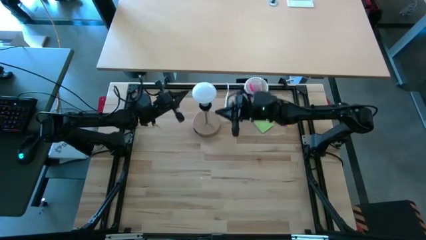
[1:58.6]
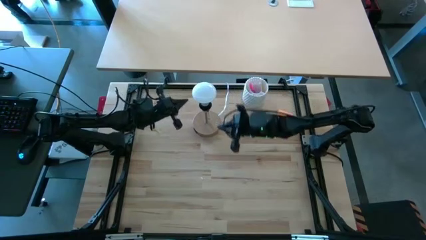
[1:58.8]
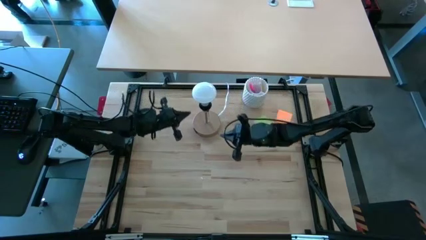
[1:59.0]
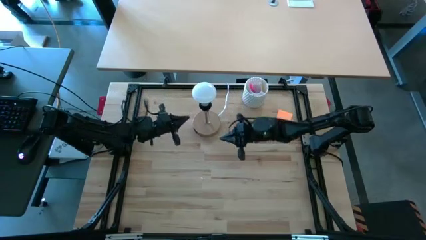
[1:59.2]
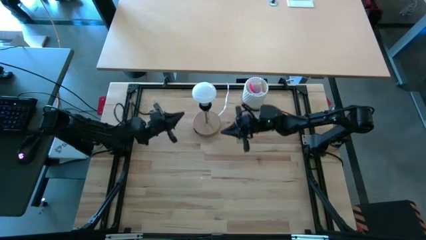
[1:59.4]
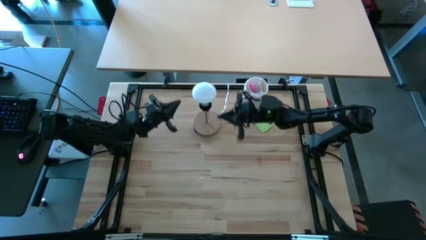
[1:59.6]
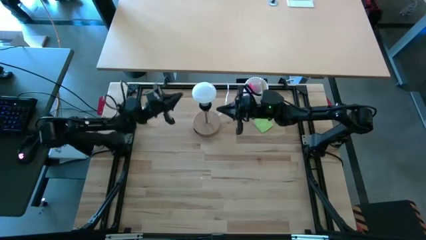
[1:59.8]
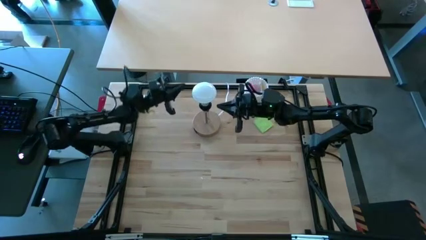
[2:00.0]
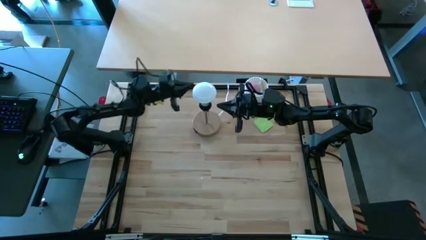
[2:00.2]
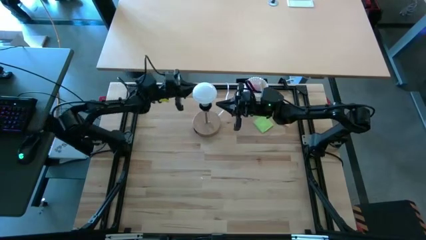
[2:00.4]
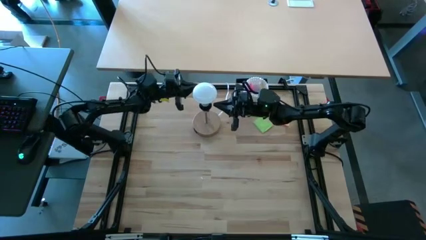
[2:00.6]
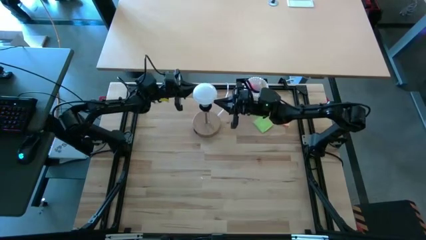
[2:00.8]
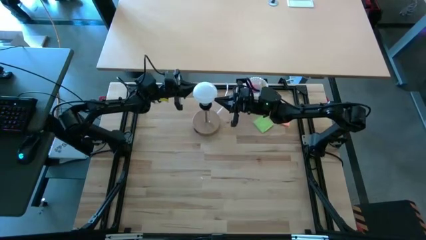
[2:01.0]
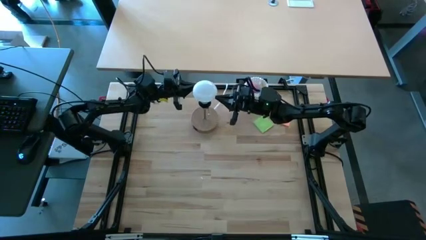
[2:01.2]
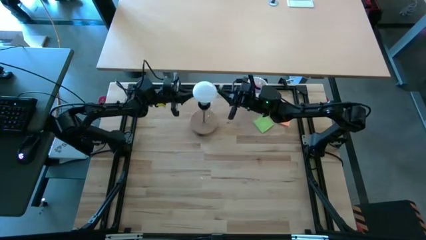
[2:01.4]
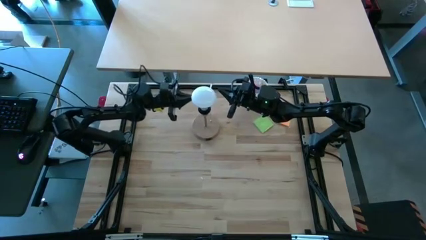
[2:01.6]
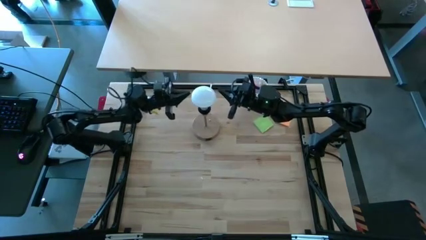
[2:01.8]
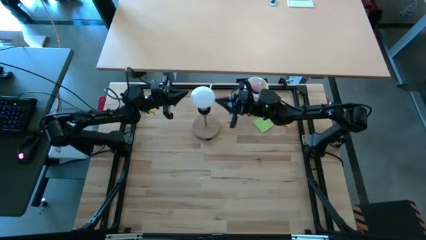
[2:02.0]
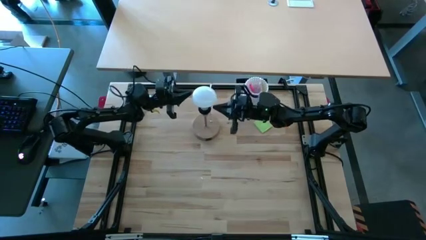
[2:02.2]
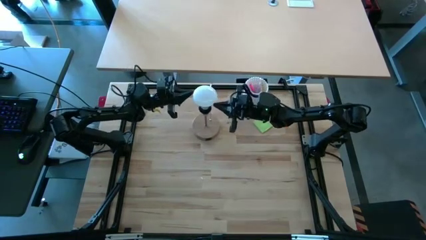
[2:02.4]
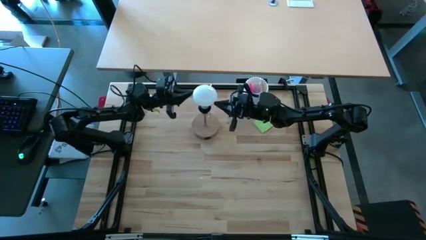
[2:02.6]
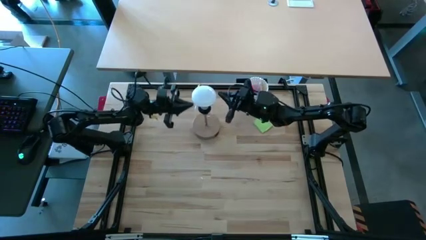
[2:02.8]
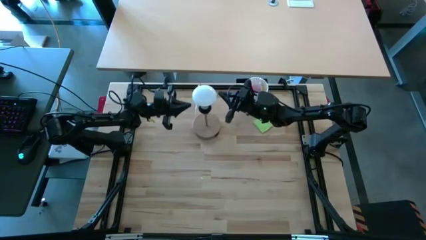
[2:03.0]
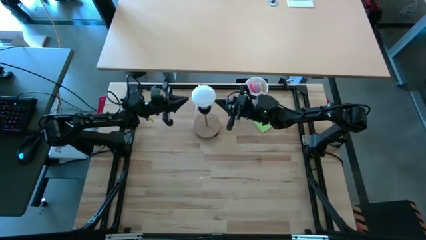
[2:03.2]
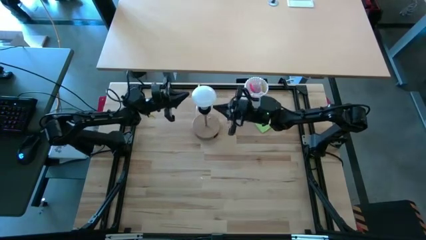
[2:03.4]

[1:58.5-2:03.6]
Task: Screw lightbulb
Remove the white lightbulb from the brown lamp

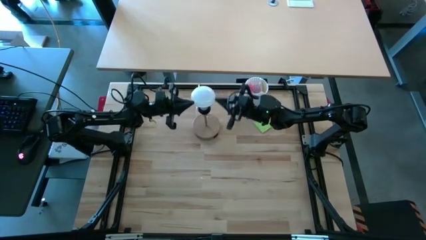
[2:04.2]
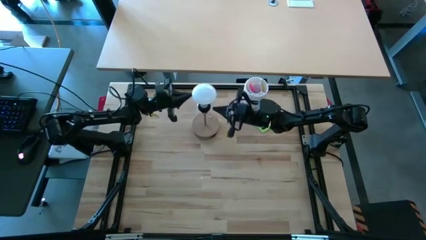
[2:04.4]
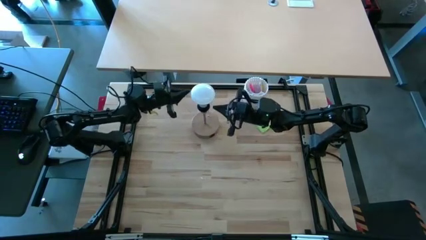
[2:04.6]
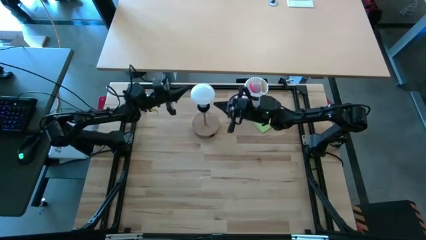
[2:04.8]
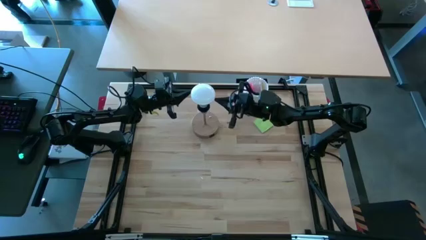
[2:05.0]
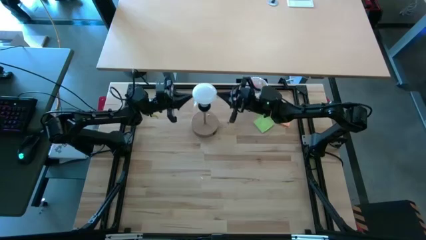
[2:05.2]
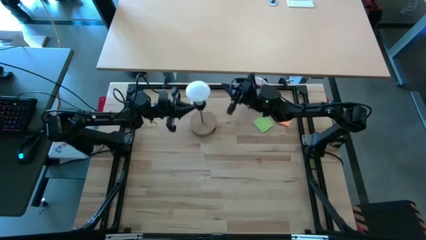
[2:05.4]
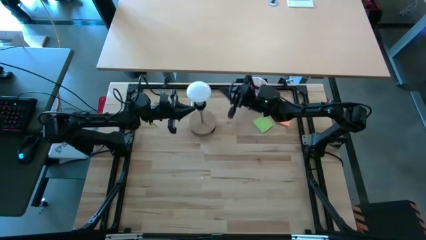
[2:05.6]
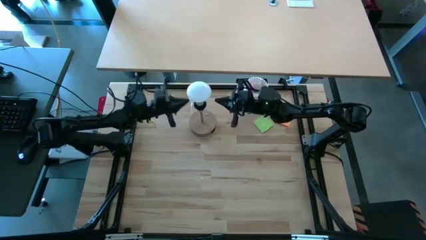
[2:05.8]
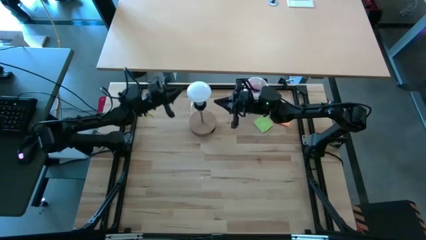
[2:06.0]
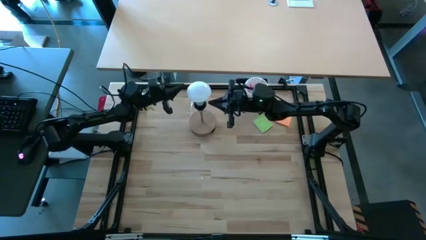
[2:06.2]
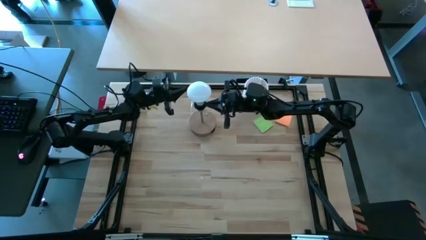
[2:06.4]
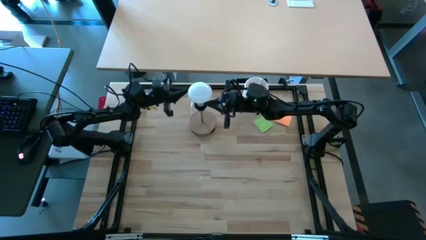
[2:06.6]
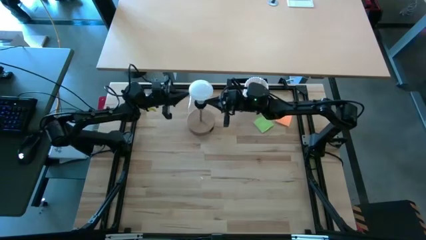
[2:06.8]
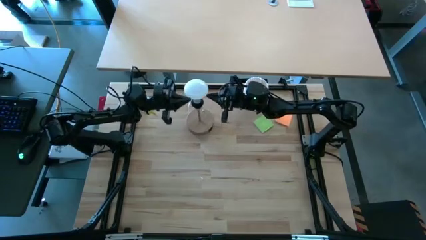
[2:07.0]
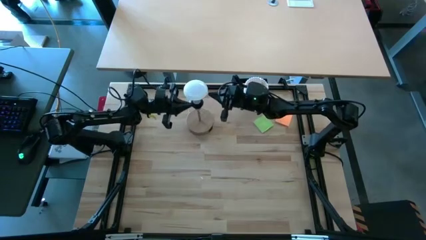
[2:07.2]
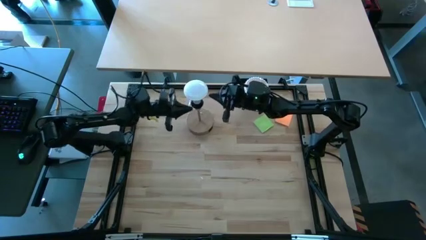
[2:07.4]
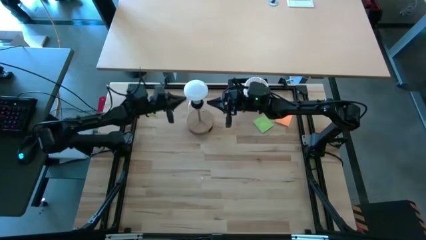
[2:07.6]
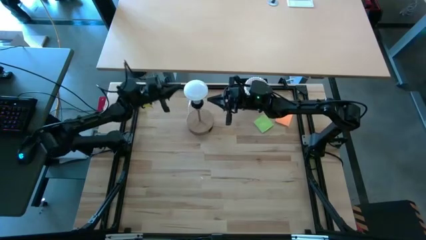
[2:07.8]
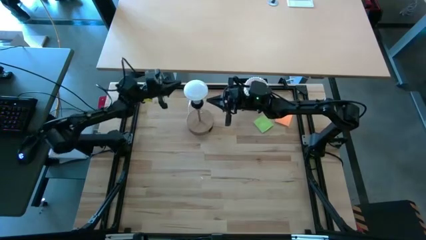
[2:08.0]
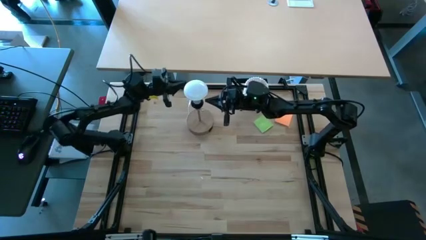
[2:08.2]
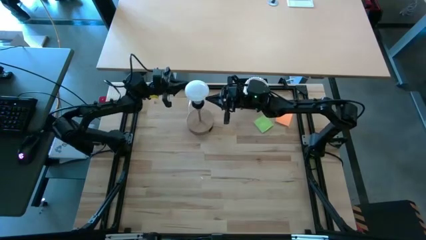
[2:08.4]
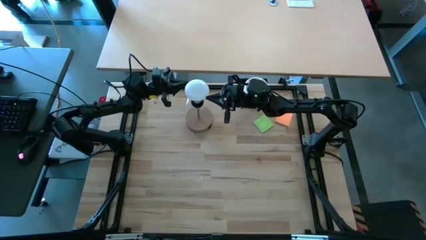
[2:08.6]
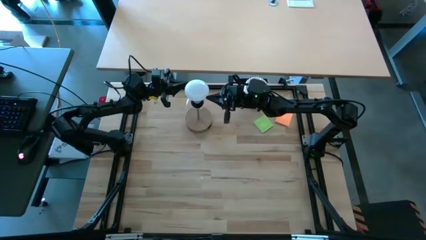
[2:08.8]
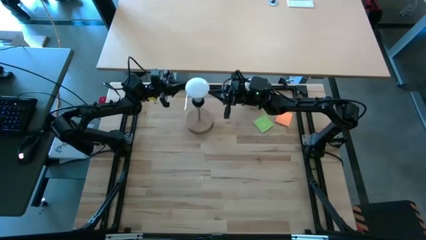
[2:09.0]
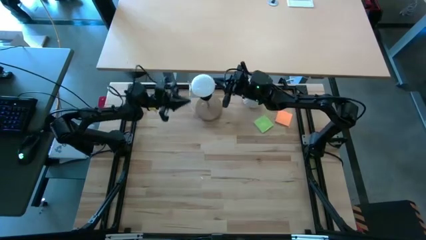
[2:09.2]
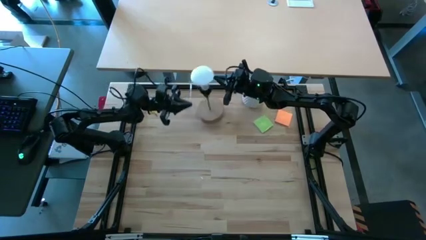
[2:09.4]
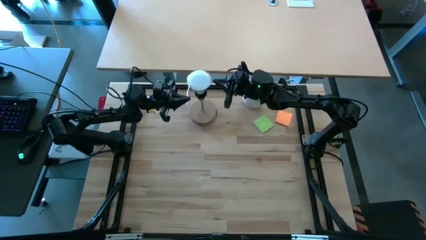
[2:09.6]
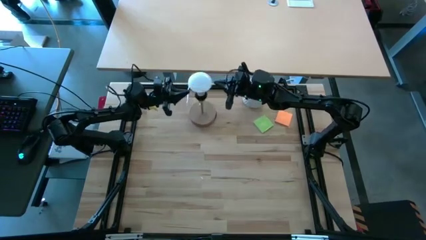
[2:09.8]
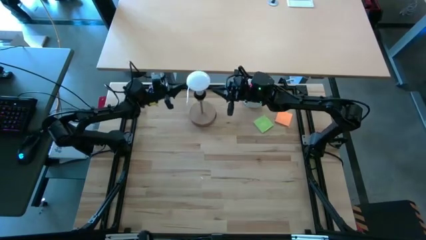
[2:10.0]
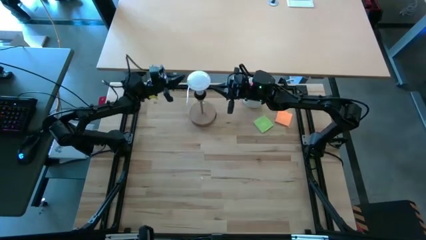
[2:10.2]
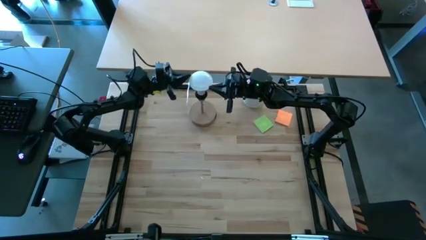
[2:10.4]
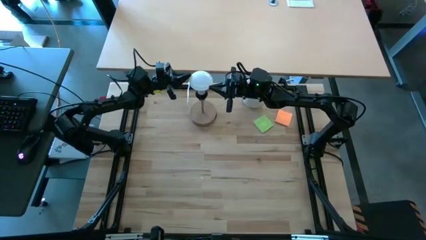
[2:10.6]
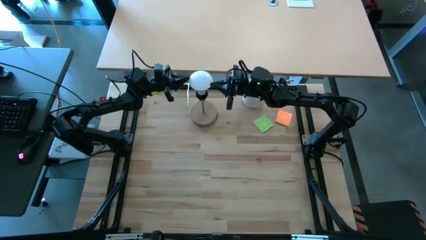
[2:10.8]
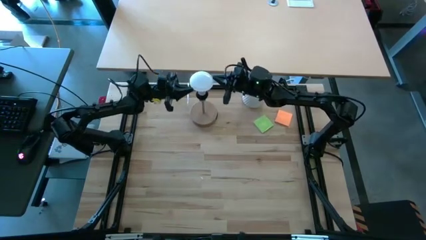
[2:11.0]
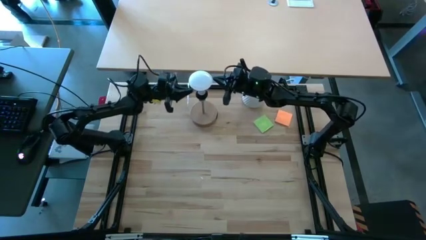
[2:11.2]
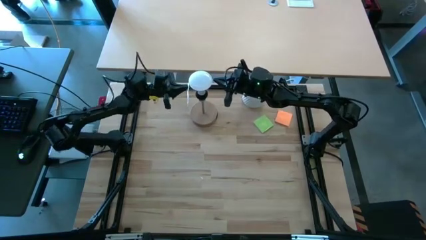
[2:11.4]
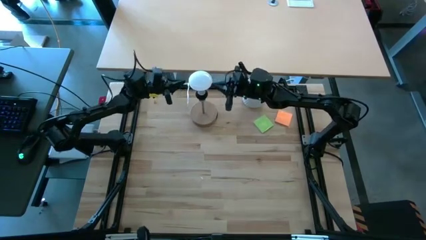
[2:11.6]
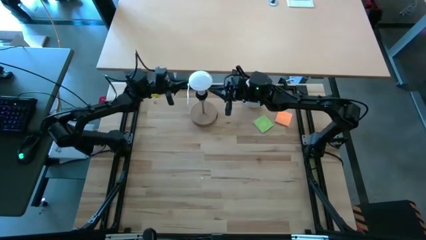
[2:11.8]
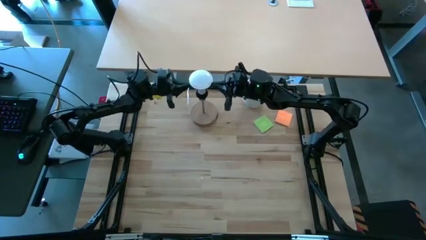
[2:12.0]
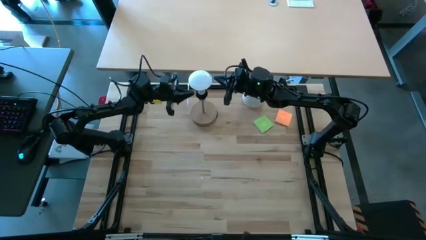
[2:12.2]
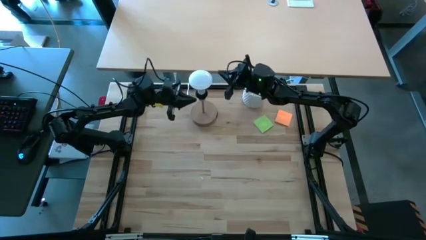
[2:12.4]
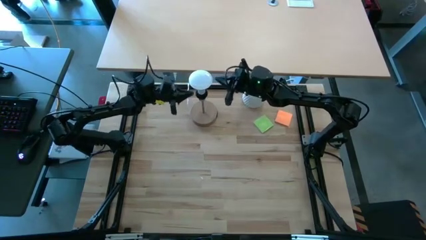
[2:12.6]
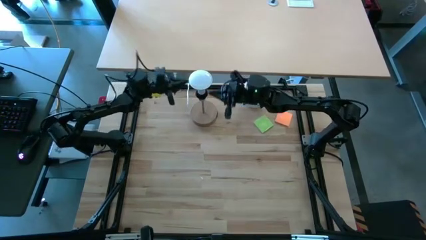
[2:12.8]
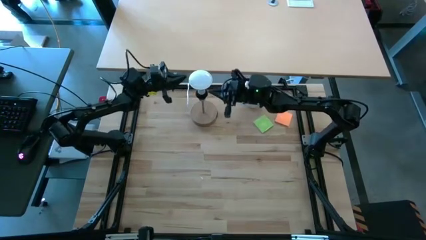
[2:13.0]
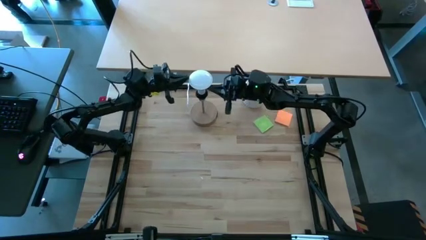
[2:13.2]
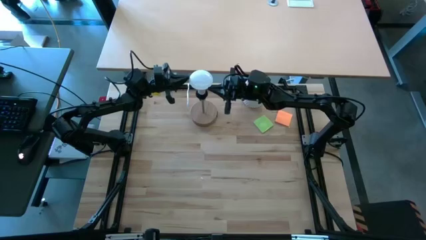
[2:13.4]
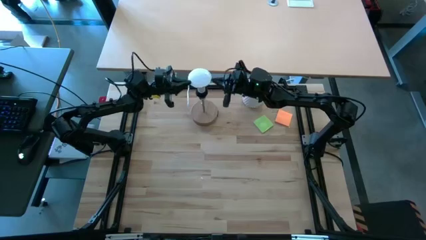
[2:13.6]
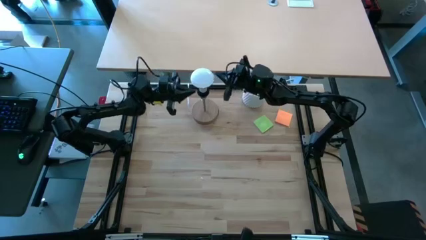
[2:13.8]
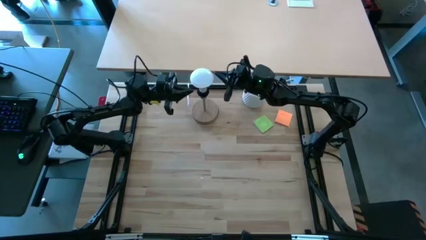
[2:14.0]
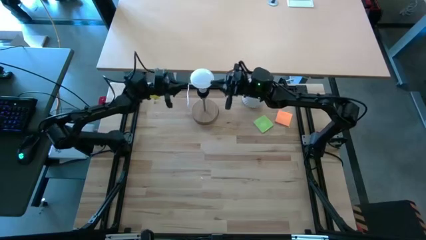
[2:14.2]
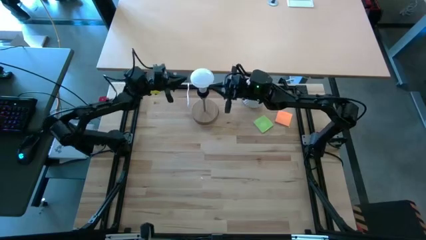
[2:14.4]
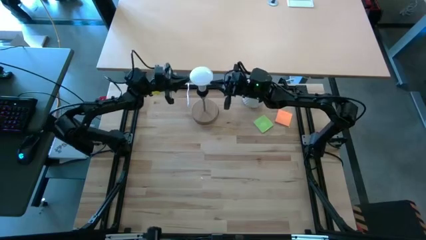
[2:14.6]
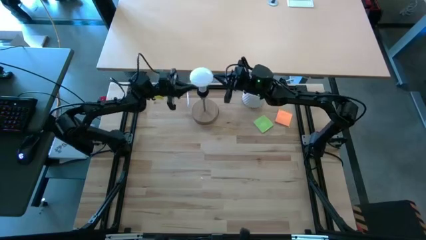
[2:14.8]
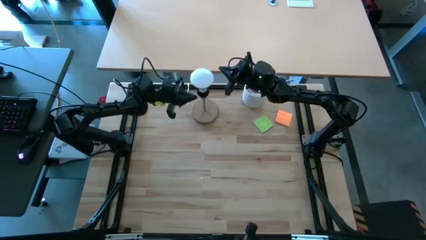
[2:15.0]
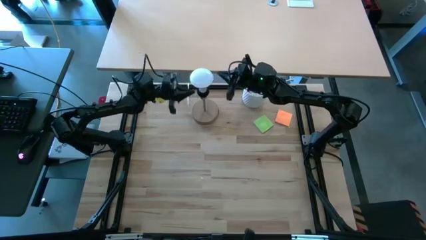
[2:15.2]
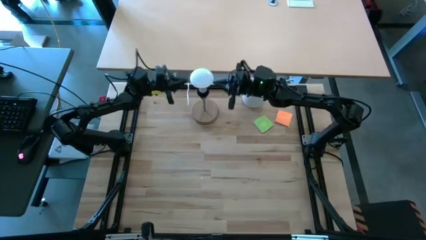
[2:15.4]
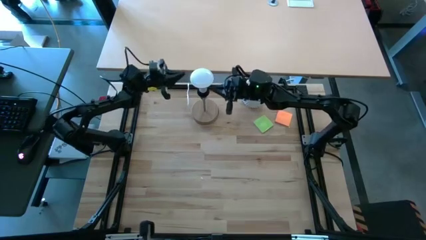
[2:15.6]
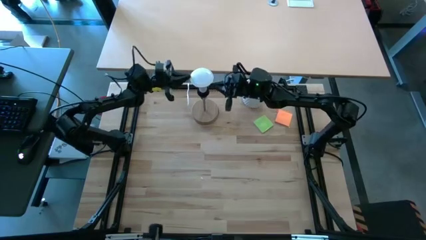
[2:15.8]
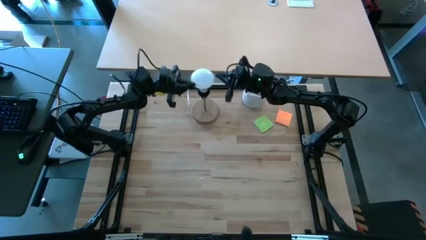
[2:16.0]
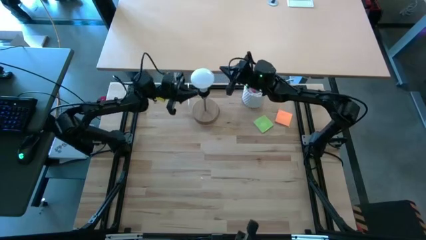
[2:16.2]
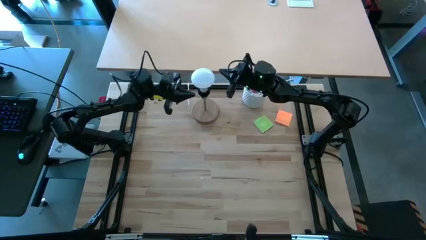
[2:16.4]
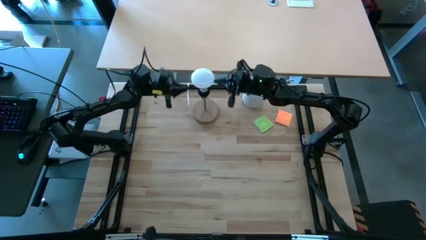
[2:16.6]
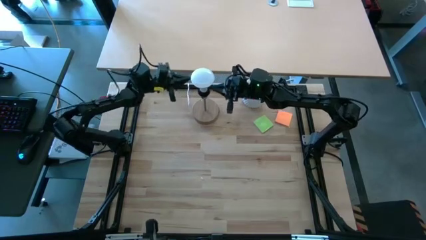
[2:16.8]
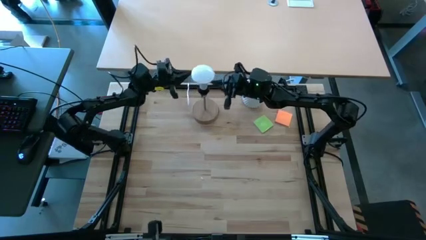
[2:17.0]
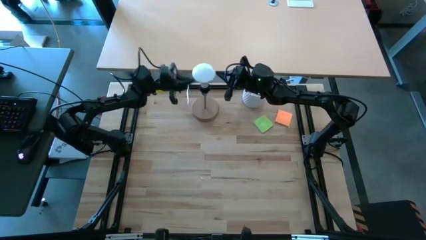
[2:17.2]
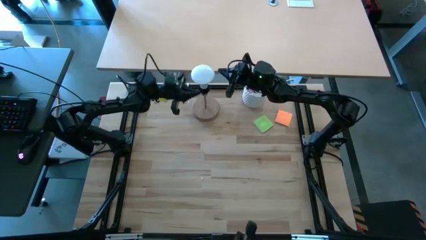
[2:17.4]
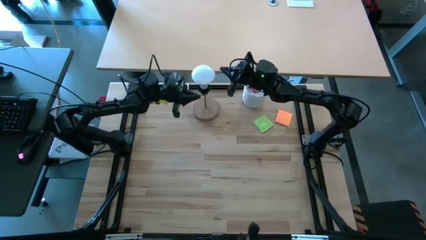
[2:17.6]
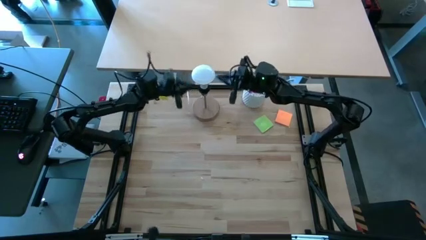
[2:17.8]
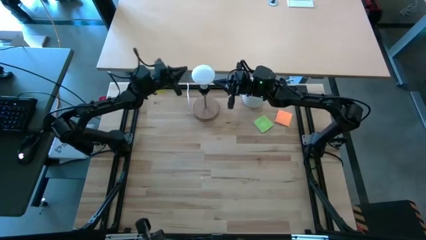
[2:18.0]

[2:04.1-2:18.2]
Remove the white lightbulb from the brown lamp
